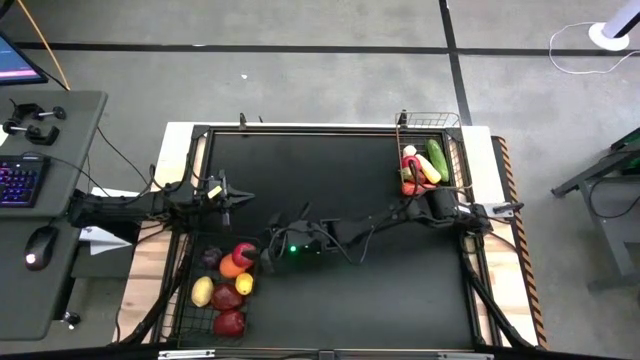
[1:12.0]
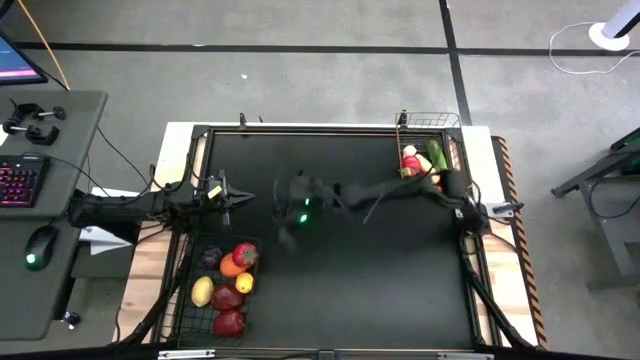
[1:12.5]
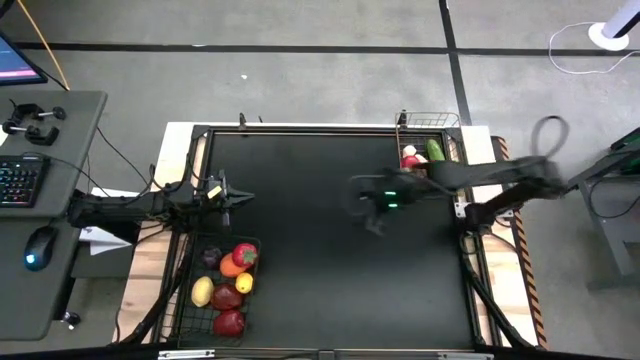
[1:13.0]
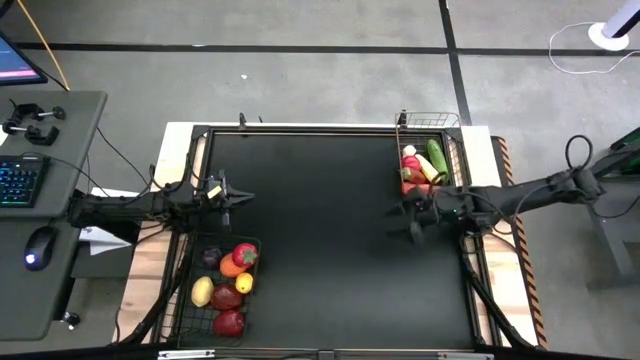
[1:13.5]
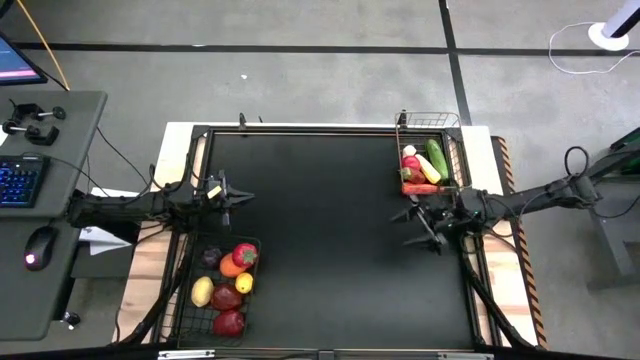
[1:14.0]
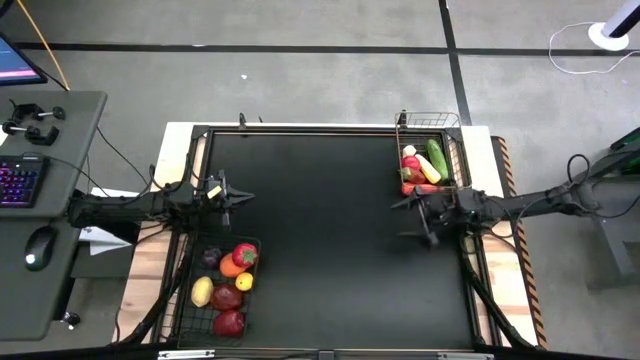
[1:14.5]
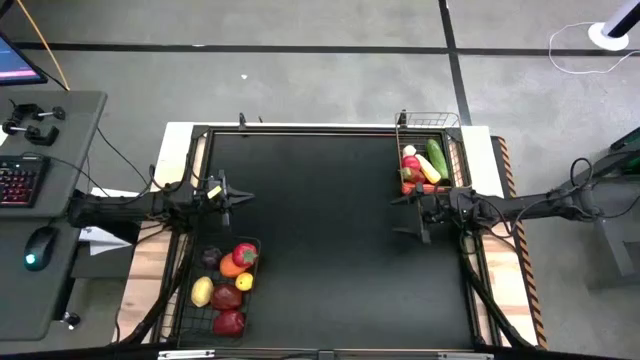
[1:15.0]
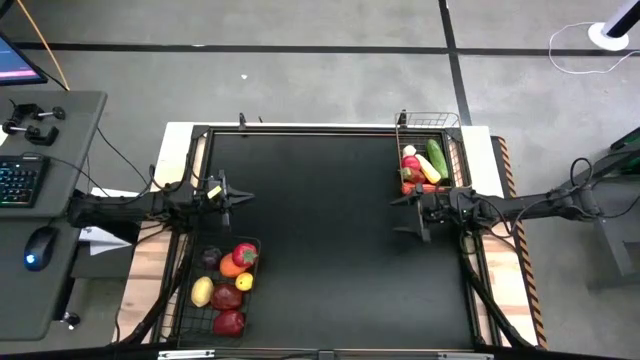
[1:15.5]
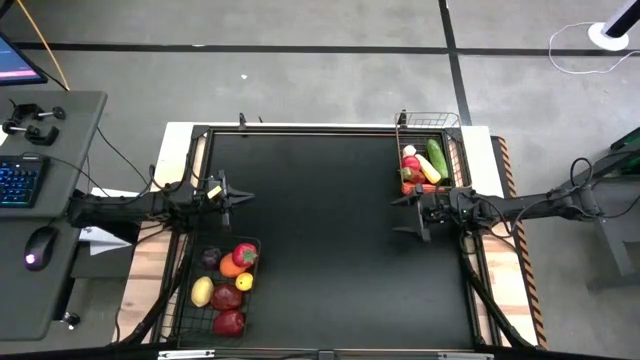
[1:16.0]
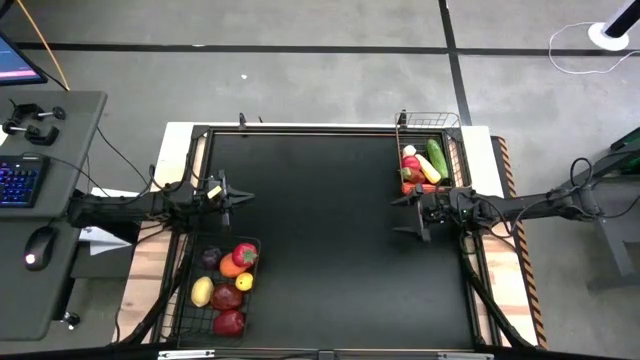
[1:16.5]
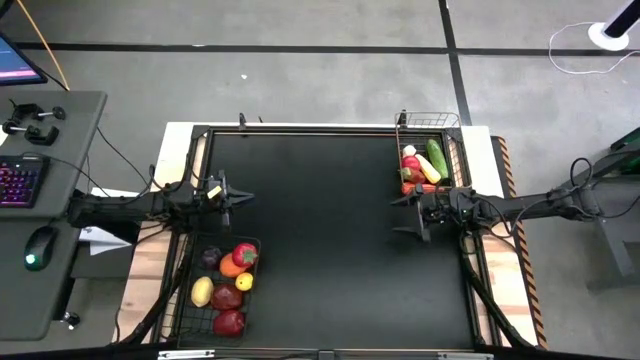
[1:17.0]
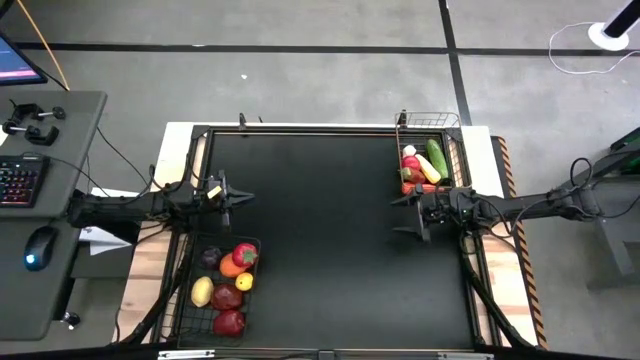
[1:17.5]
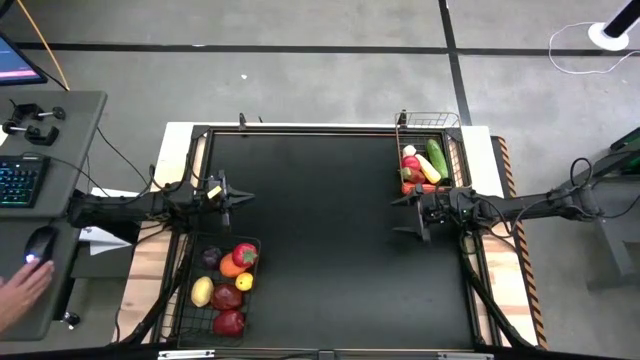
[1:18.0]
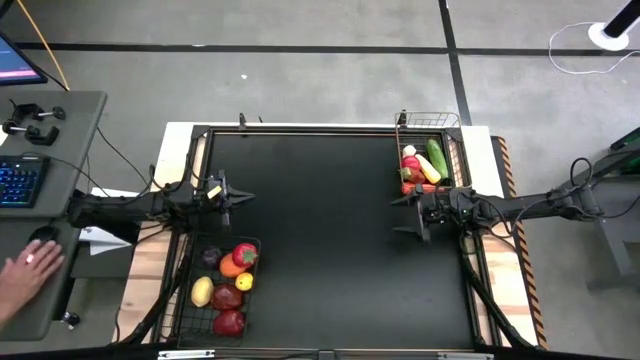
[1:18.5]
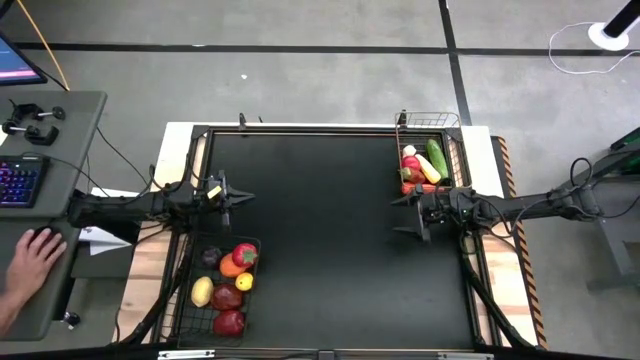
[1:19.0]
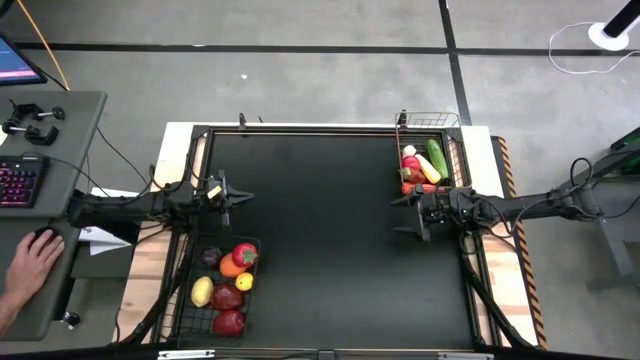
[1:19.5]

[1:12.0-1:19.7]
Task: Sort produce into baskets
Return to Home Position

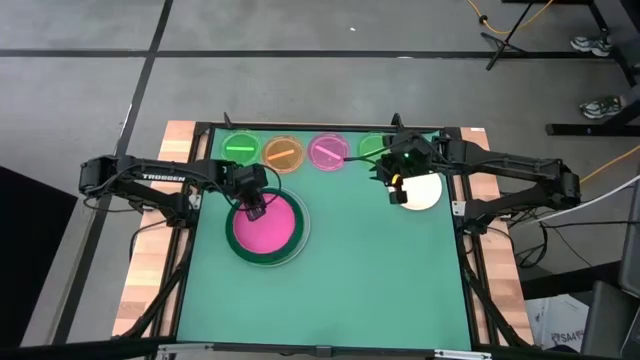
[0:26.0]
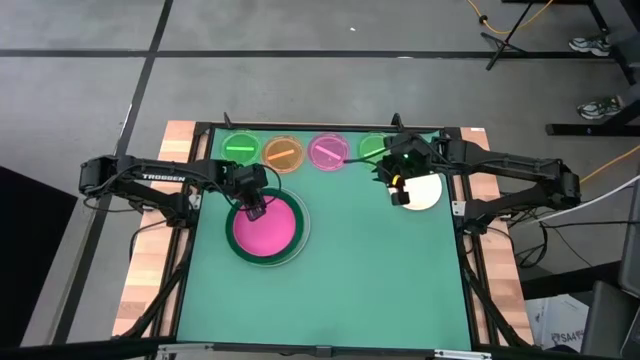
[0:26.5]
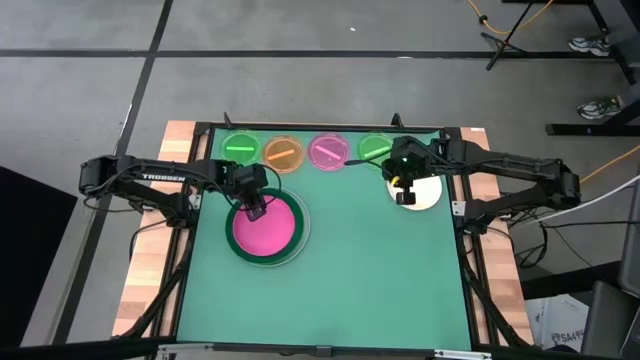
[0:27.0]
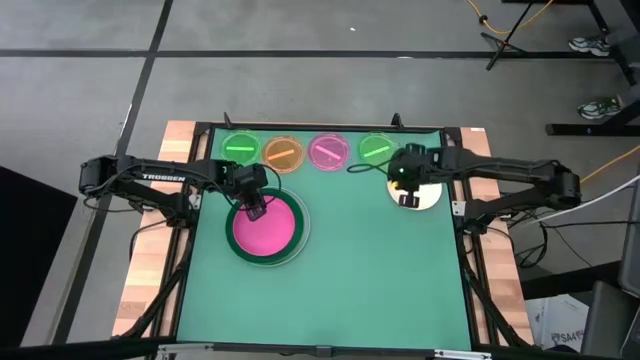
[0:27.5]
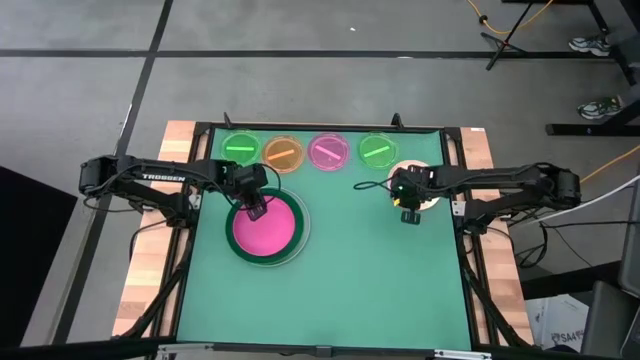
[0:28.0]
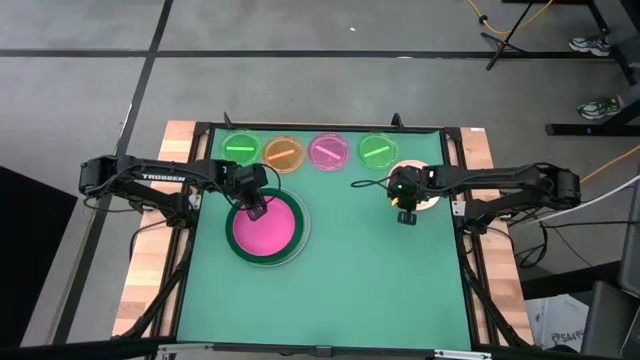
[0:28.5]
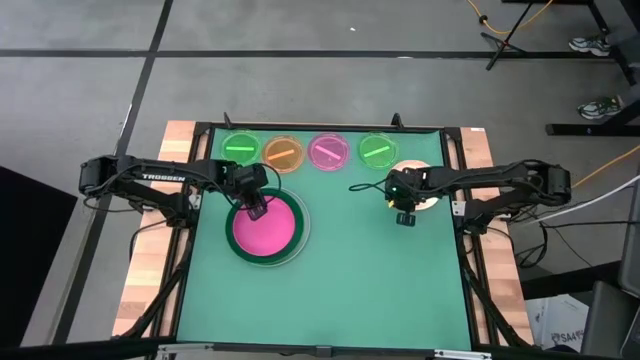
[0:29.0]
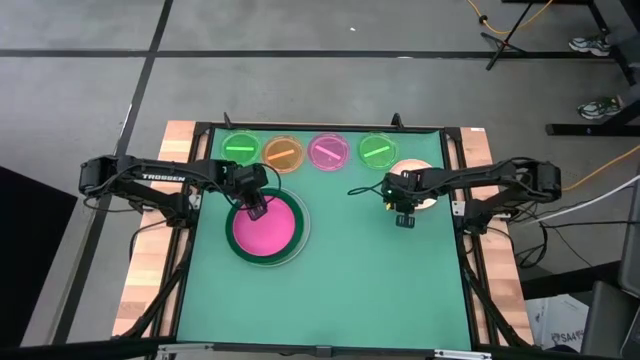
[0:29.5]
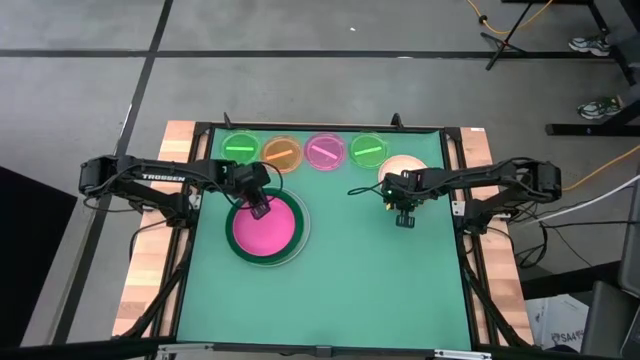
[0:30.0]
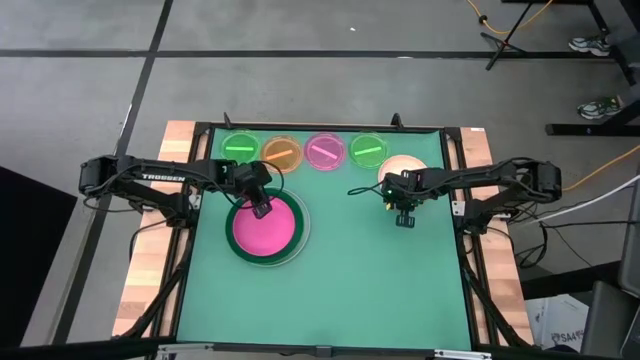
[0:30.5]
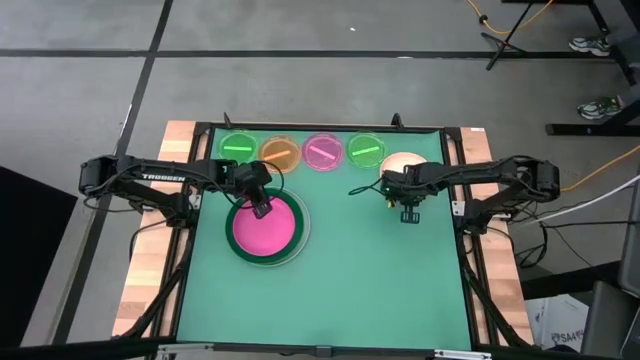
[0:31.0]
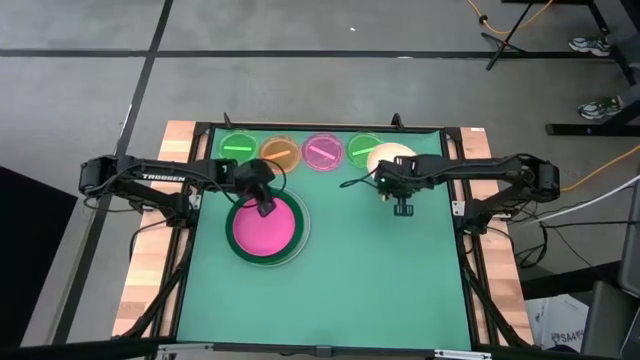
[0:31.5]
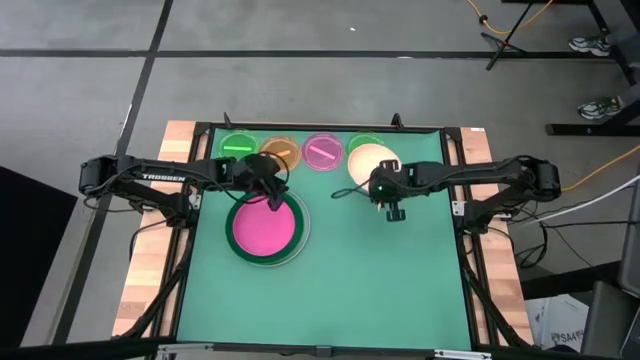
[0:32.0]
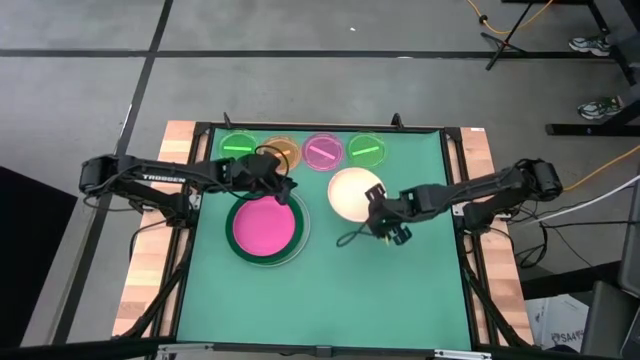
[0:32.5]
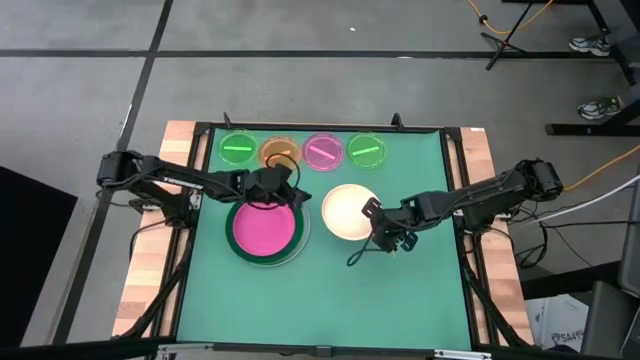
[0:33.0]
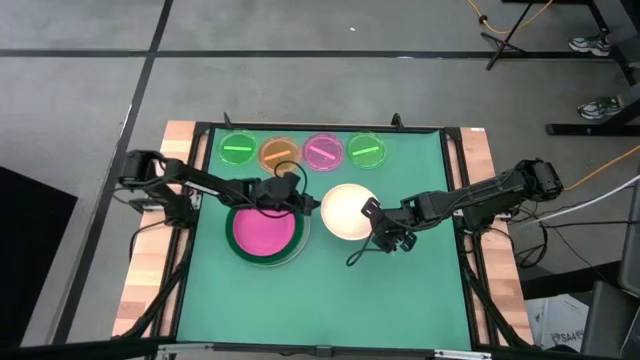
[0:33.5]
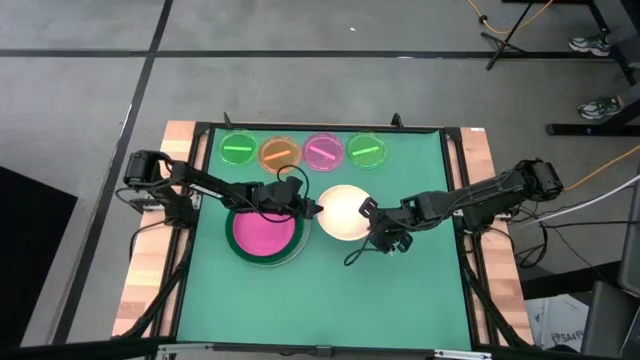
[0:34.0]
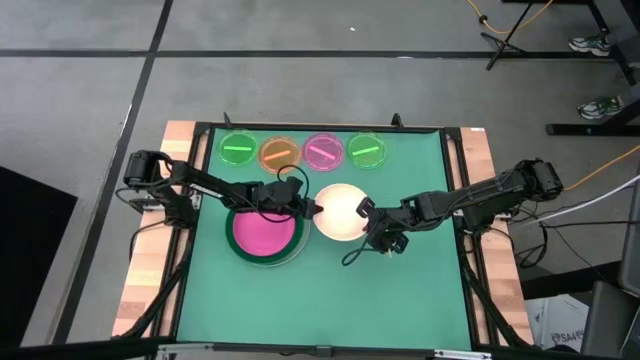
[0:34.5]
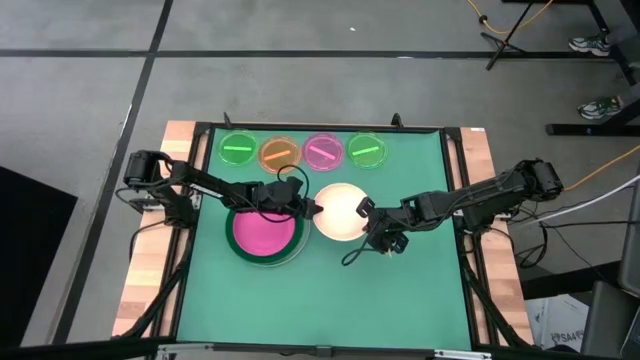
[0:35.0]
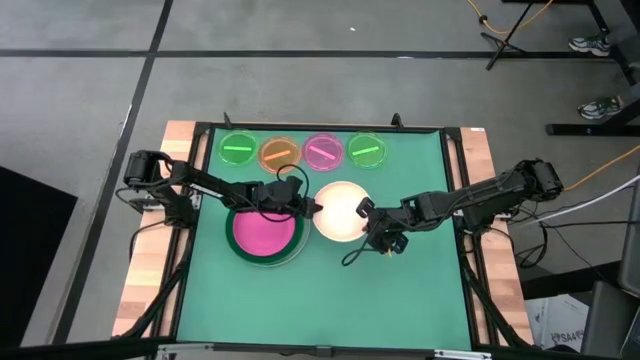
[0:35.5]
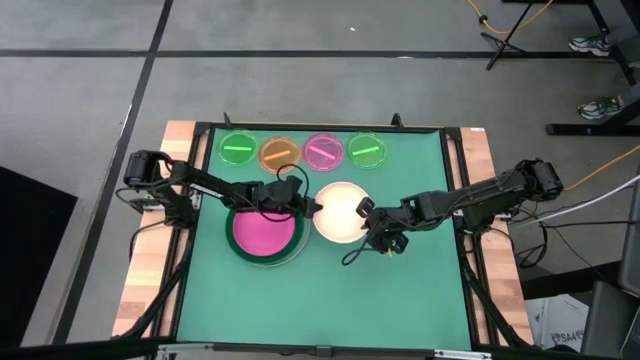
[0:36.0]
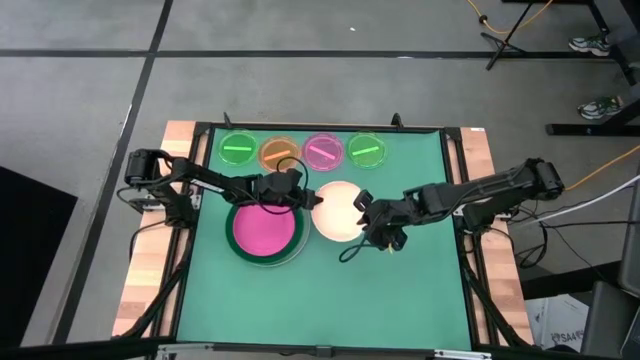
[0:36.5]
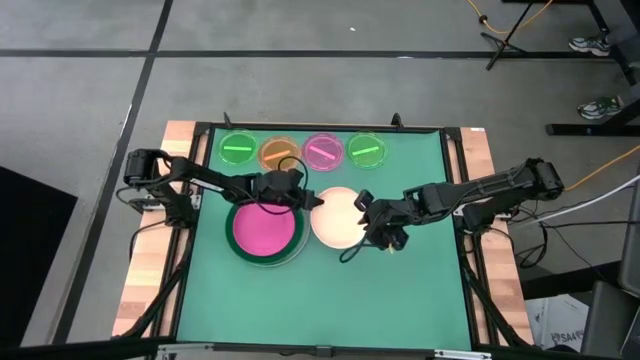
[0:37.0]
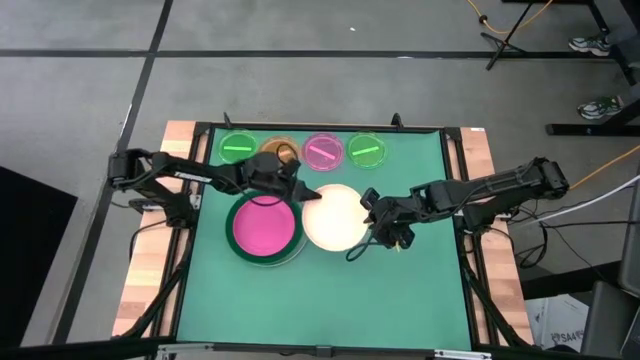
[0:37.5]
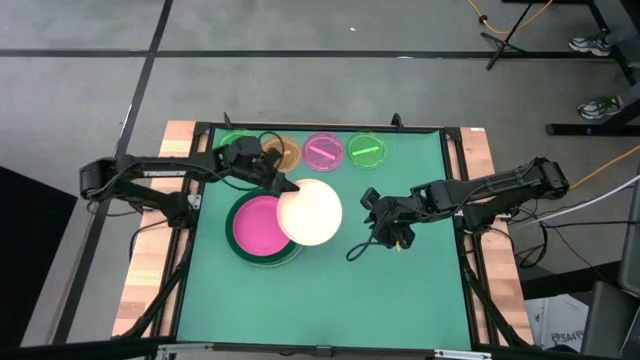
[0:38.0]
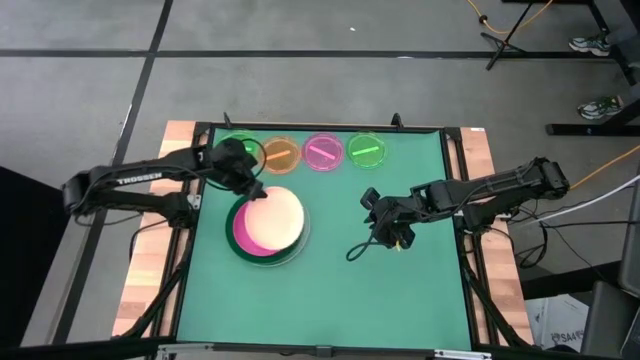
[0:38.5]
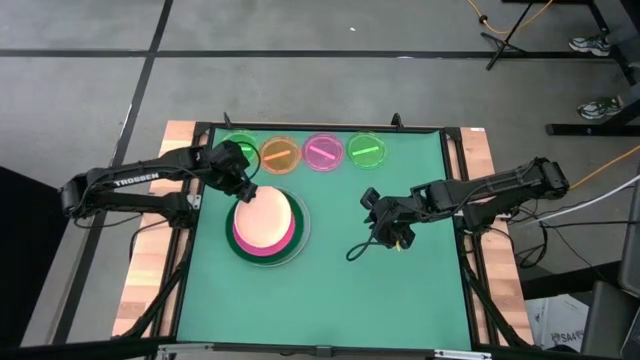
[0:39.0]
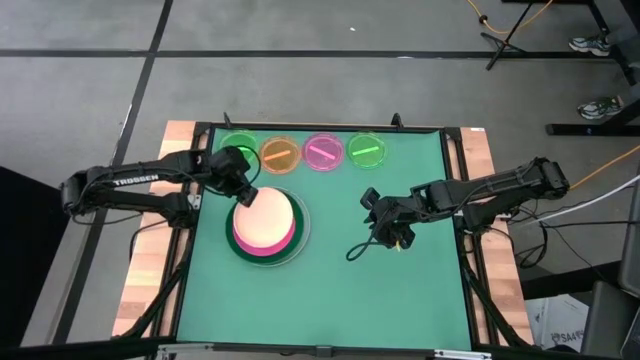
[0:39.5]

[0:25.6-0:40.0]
Task: Stack plastic plates
Stack the light orange plate on top of the the pink plate
